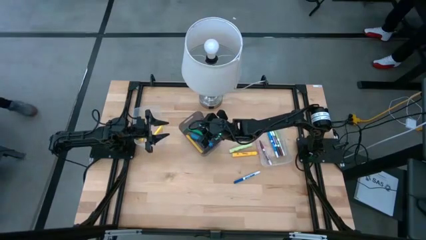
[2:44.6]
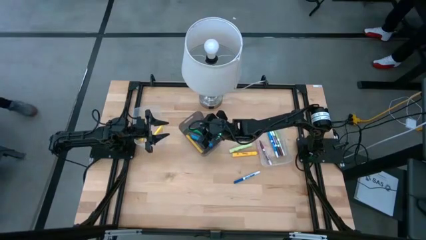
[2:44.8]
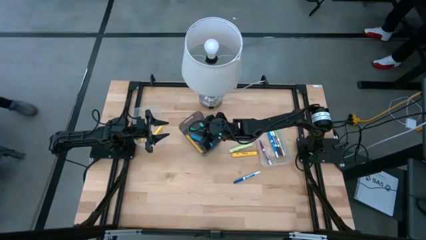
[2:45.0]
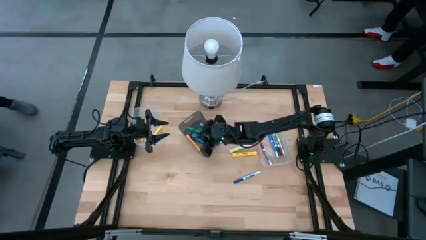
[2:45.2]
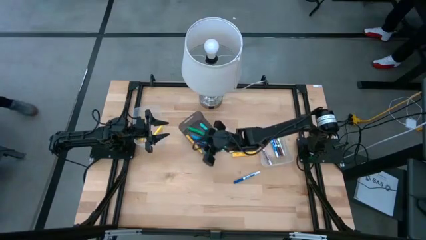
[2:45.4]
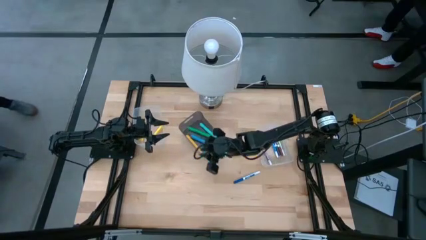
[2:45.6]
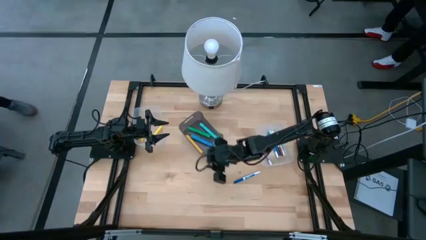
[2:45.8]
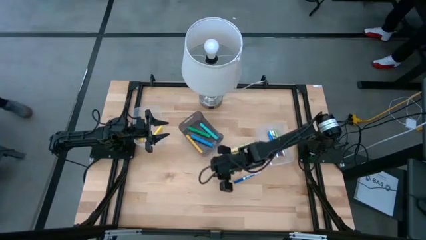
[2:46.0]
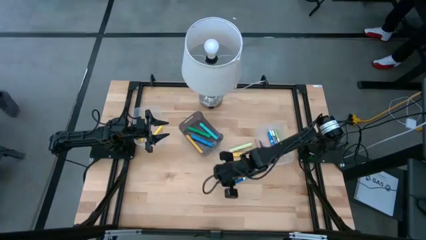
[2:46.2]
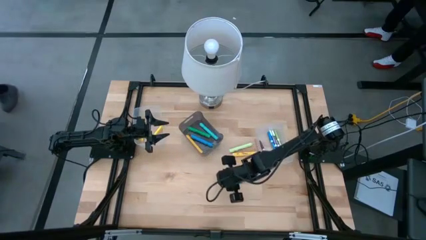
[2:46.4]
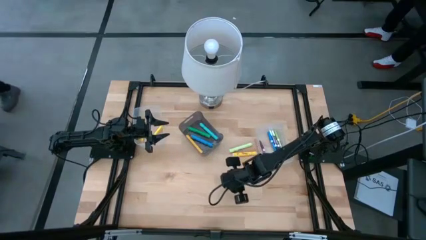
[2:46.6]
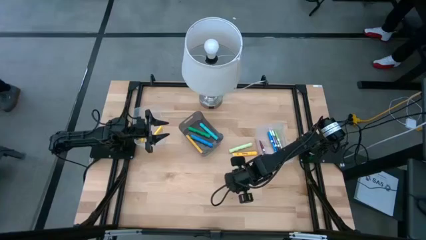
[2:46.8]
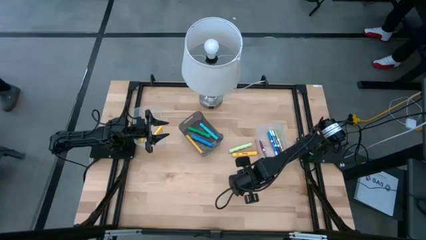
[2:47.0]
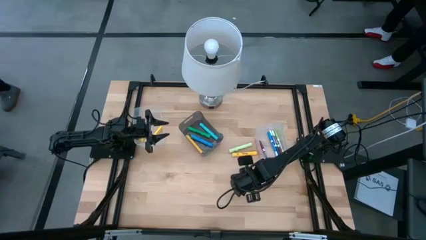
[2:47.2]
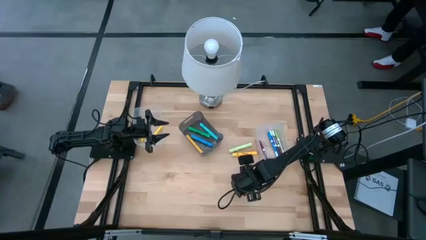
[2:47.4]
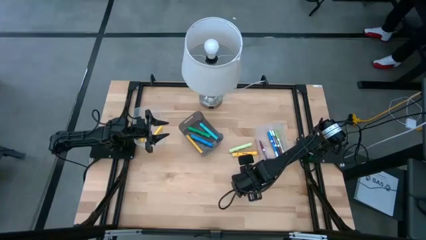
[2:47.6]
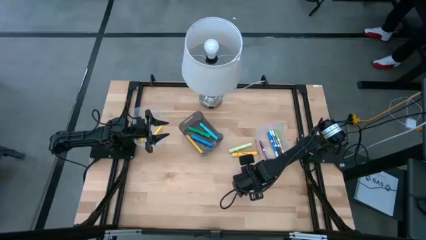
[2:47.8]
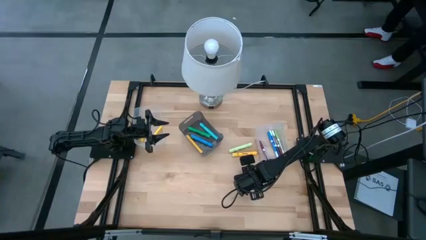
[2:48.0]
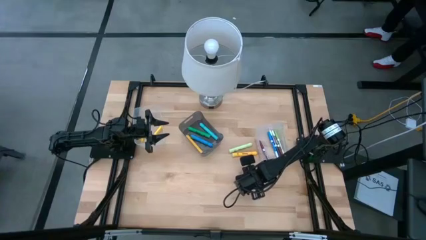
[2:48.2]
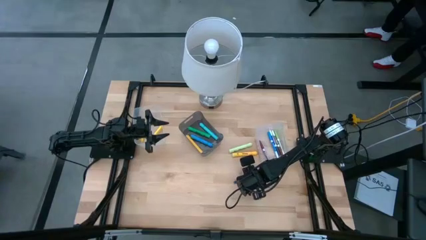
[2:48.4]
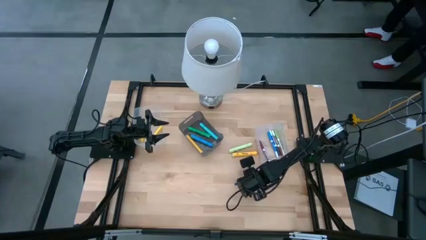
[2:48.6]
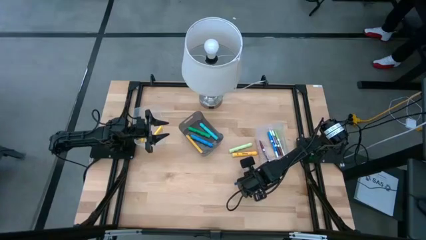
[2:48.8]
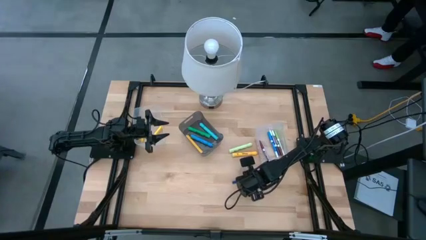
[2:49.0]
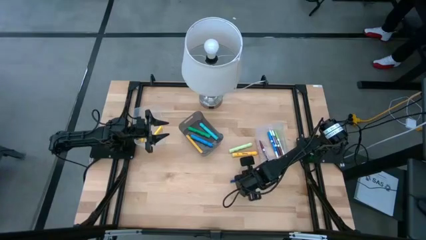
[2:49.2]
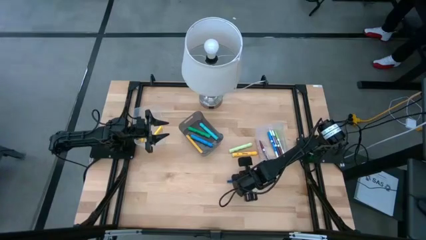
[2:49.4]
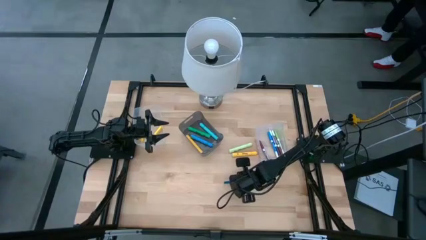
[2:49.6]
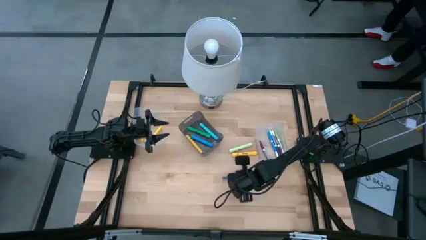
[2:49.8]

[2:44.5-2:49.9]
Task: Pick & Place Markers
Put the dark blue highlighter into the right transparent bin

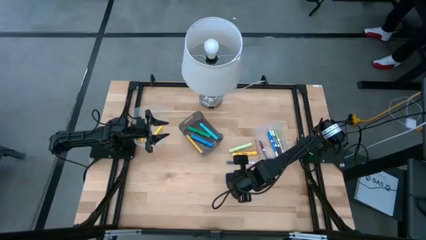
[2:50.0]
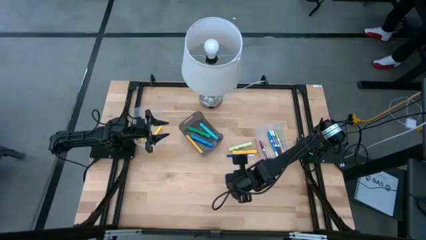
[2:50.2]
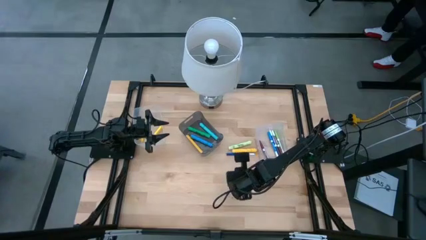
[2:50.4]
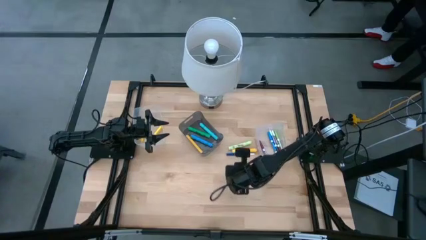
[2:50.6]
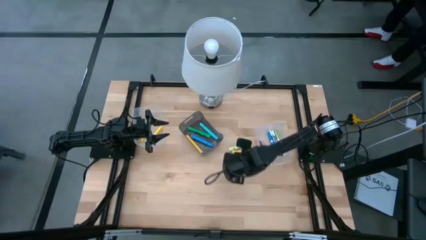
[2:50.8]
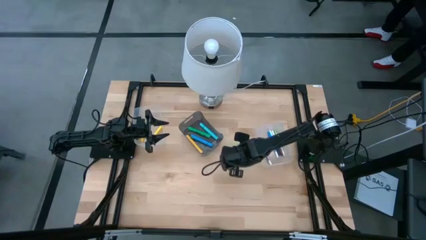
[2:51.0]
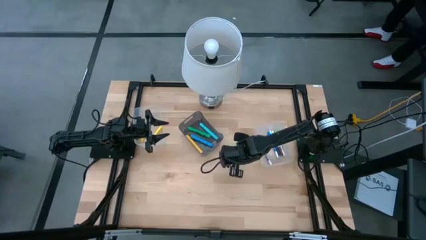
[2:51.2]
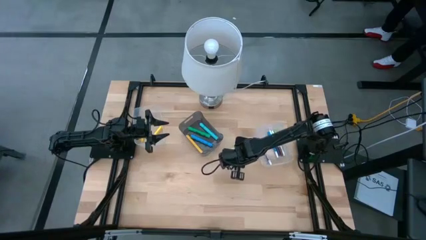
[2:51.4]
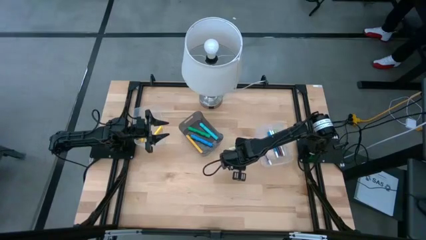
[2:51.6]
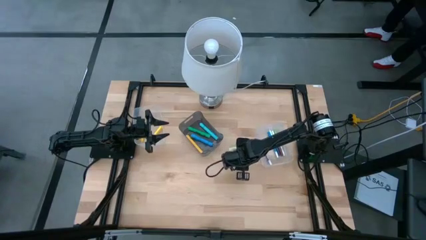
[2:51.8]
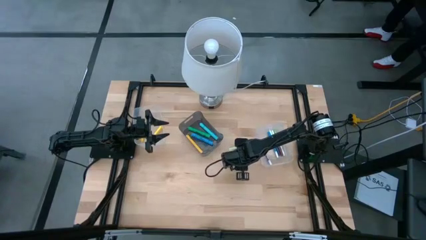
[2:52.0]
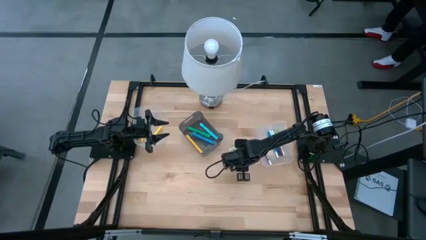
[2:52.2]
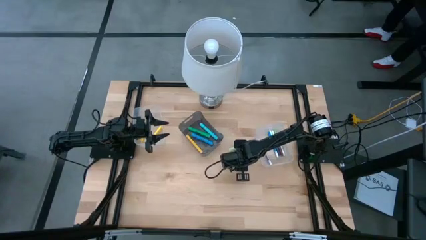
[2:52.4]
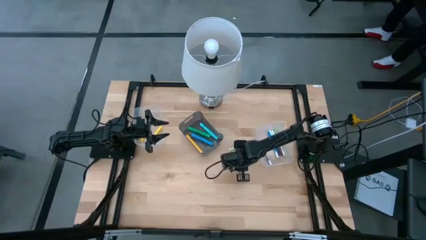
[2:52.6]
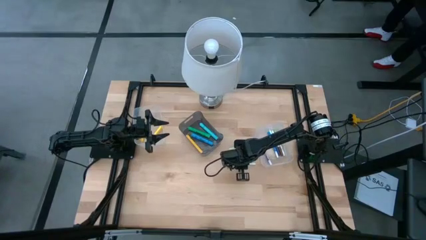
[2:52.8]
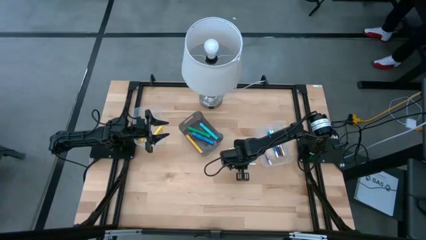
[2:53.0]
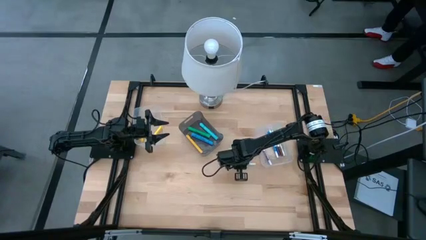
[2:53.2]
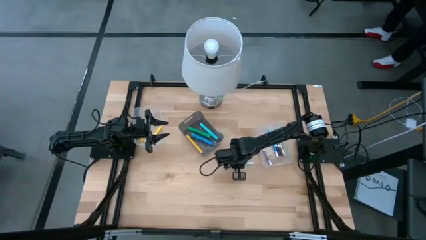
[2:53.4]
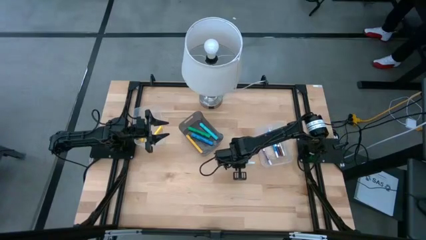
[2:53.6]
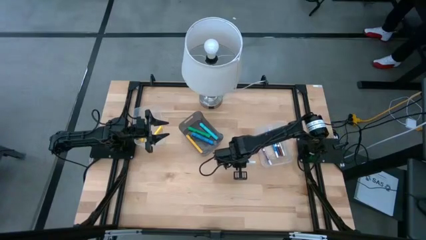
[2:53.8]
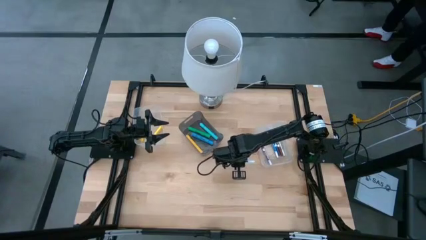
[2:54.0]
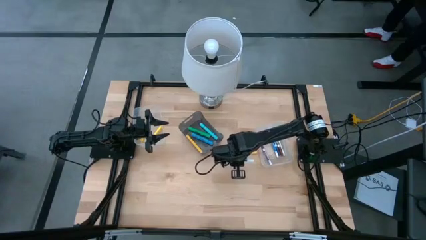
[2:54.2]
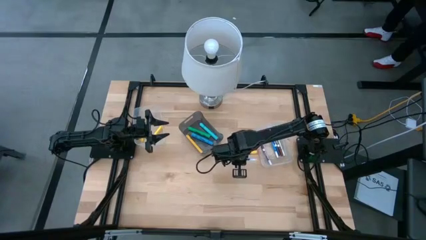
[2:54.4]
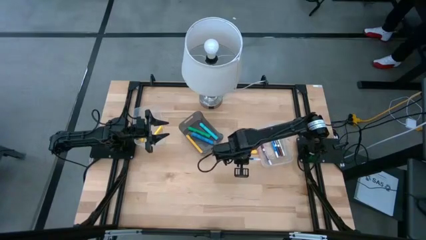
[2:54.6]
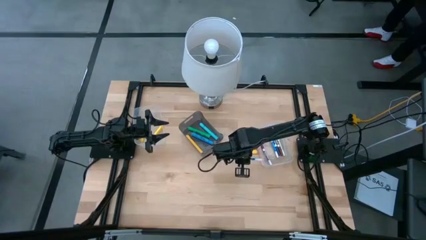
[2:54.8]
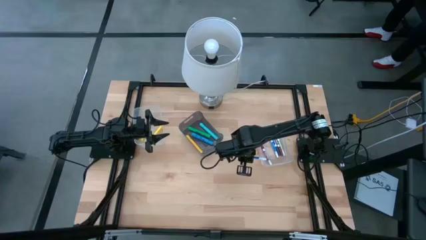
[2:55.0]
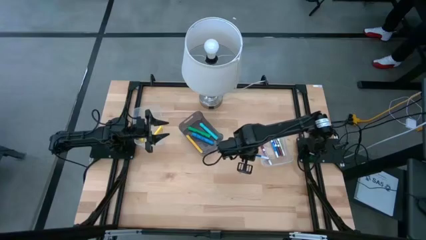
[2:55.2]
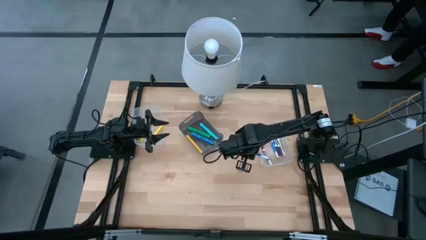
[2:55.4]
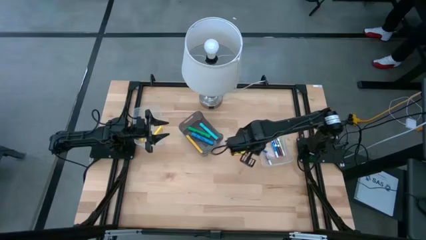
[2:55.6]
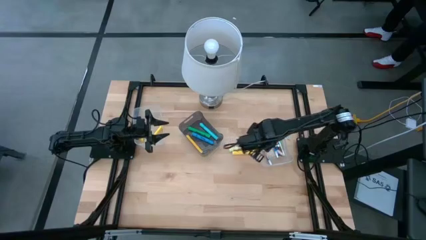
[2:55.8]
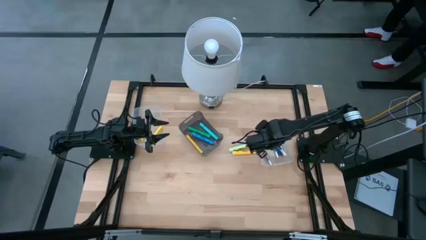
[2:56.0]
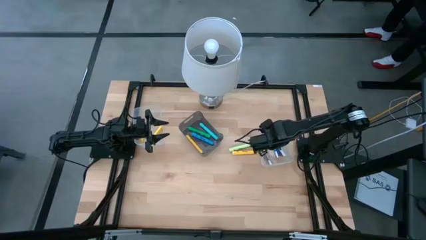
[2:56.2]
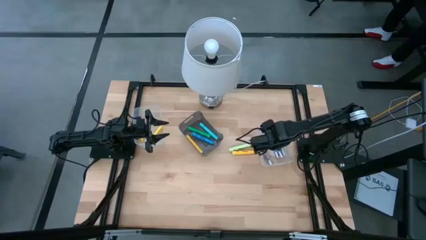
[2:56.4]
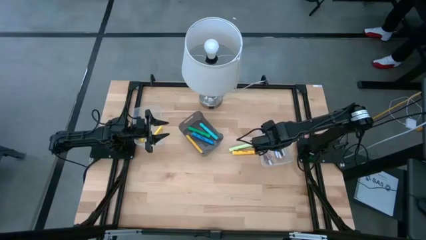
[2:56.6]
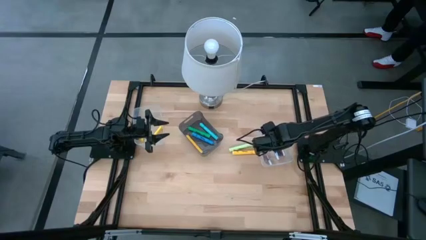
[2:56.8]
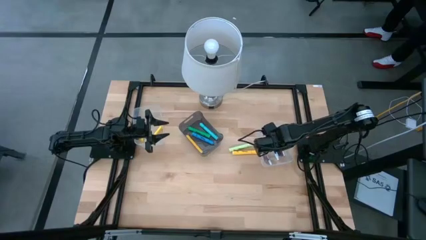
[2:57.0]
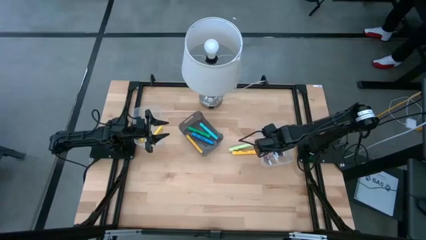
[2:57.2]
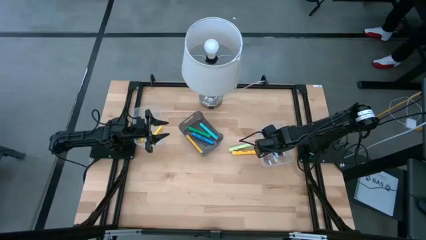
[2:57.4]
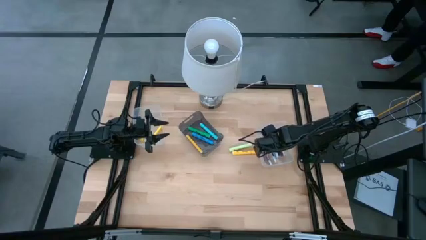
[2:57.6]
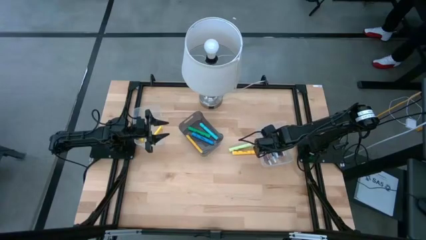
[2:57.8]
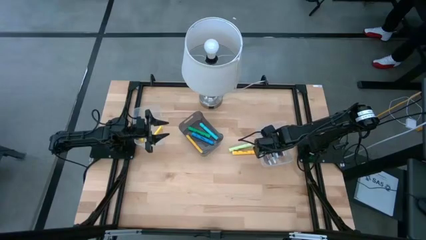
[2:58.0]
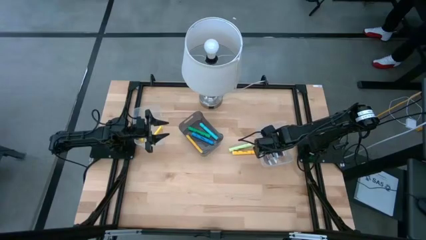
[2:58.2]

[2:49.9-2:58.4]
Put the dark blue highlighter into the right transparent bin

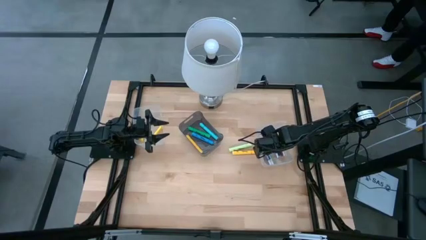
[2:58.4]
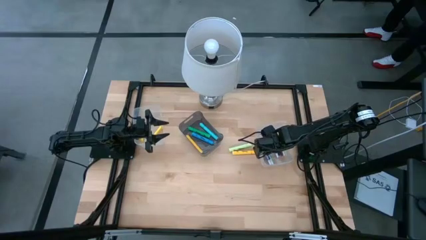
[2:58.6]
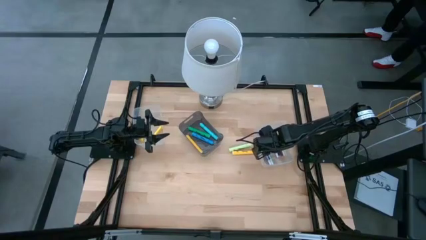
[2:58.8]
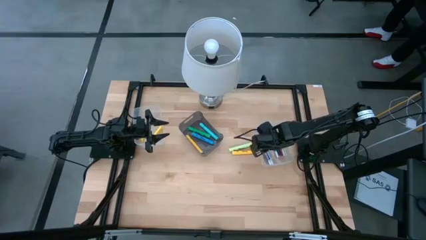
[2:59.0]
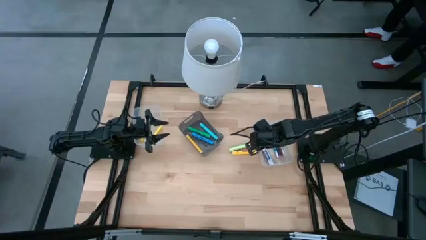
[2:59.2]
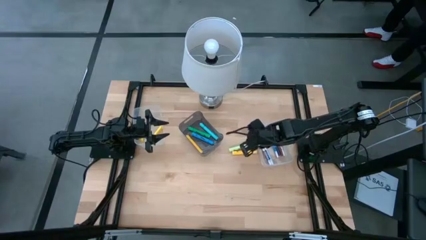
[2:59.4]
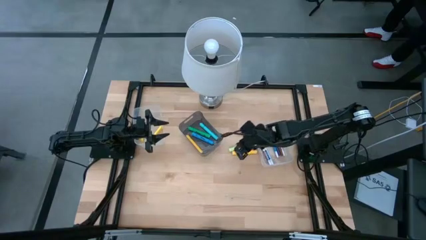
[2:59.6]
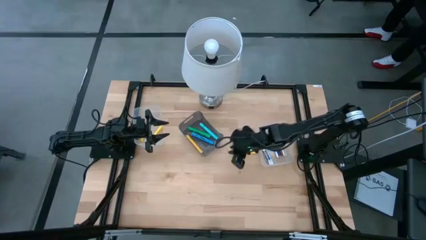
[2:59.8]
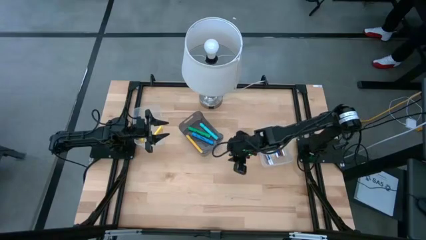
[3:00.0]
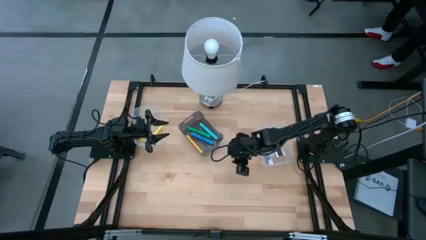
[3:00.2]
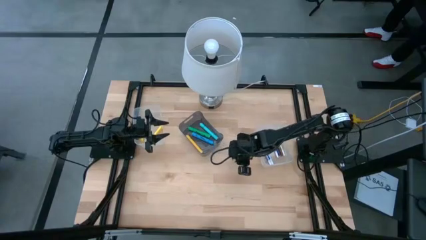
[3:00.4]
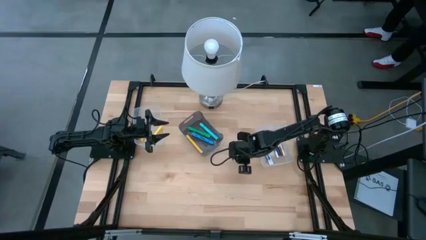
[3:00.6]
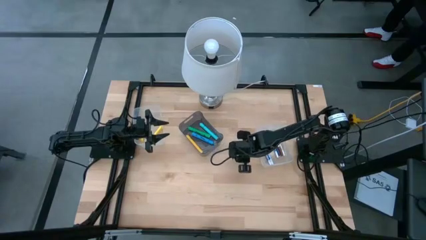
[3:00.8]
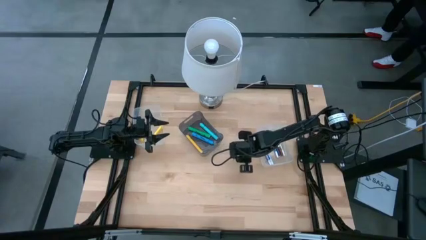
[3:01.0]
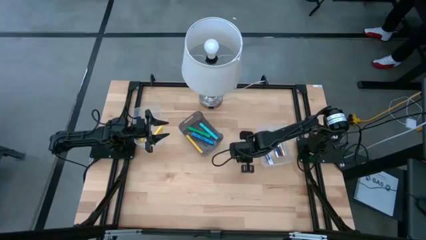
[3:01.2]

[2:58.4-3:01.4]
Put the yellow marker into the black bin
